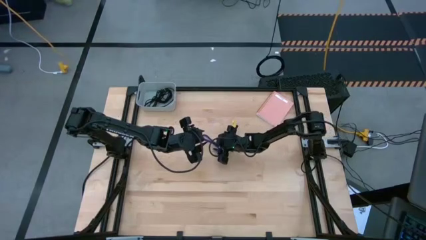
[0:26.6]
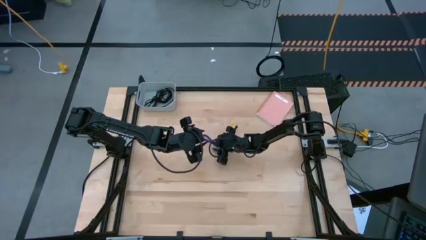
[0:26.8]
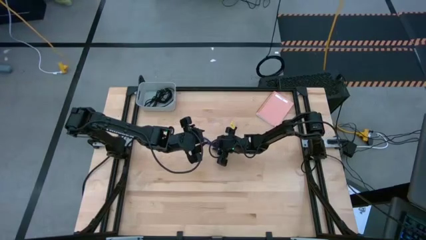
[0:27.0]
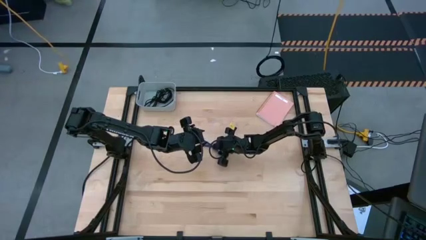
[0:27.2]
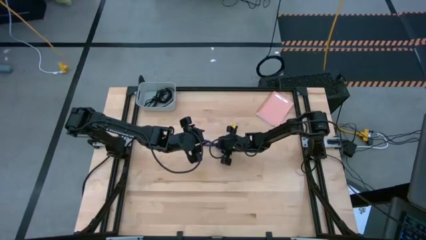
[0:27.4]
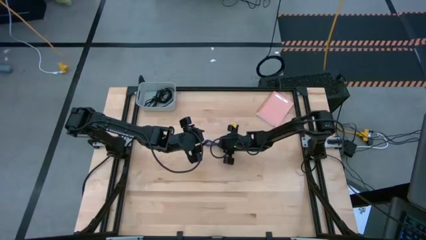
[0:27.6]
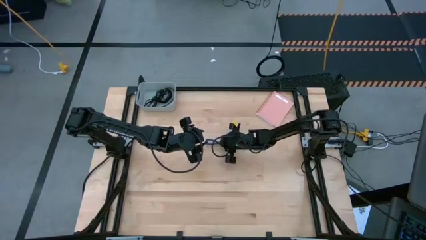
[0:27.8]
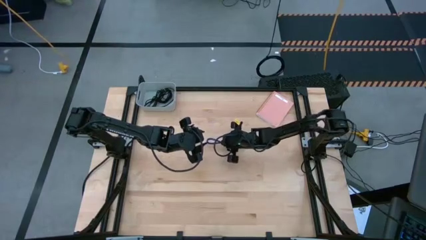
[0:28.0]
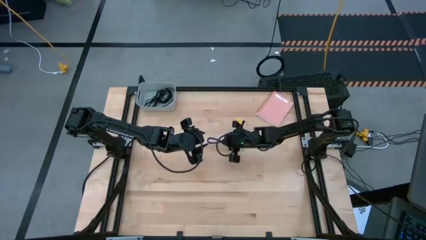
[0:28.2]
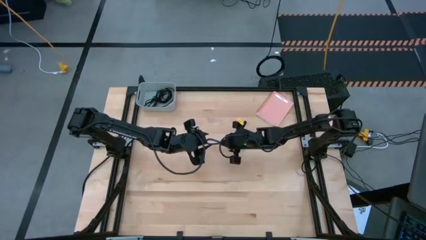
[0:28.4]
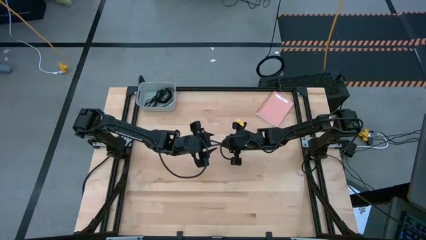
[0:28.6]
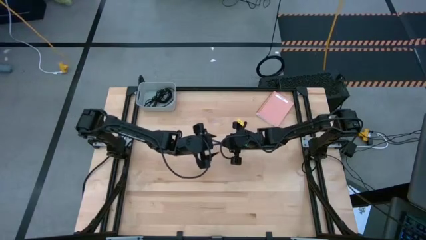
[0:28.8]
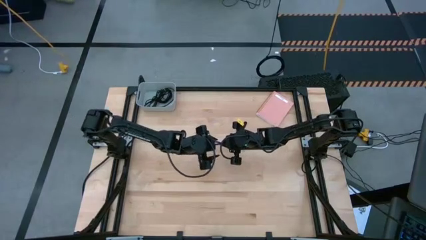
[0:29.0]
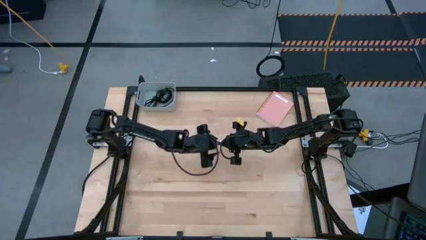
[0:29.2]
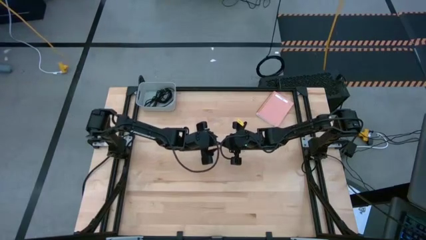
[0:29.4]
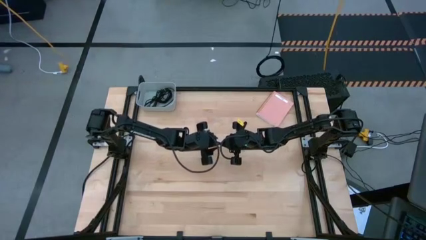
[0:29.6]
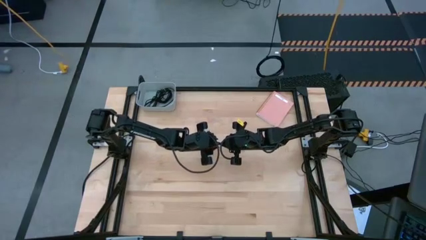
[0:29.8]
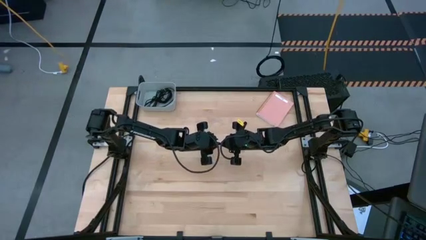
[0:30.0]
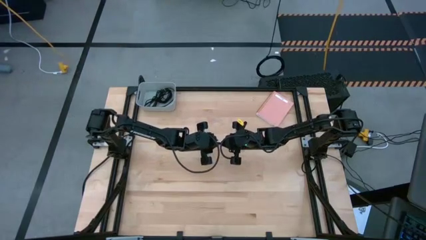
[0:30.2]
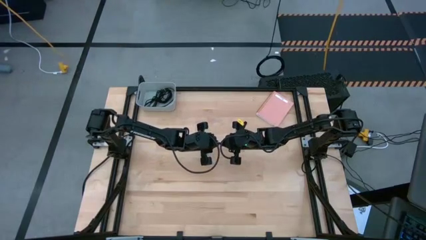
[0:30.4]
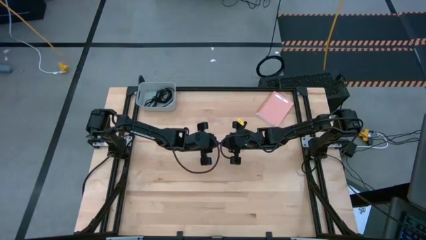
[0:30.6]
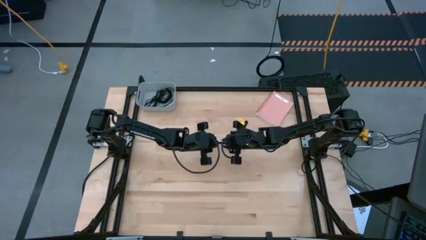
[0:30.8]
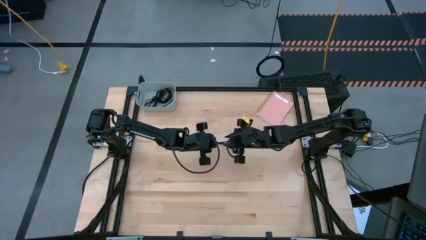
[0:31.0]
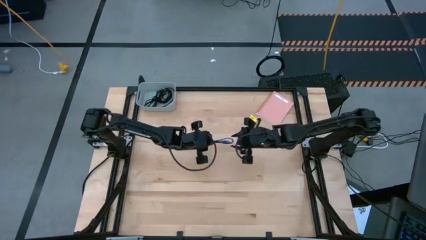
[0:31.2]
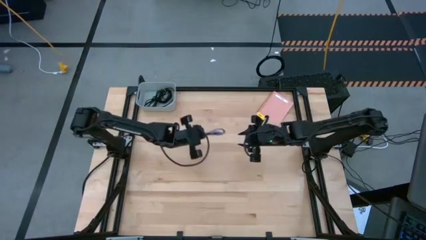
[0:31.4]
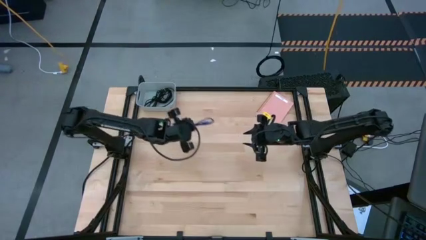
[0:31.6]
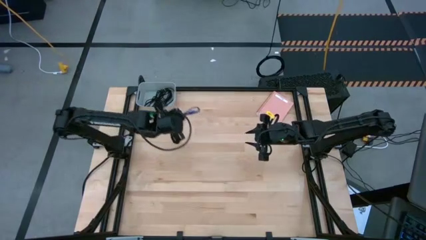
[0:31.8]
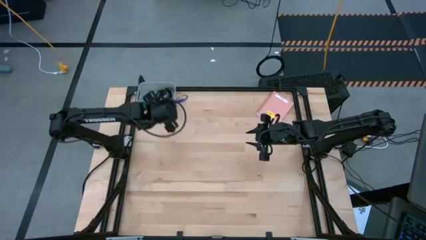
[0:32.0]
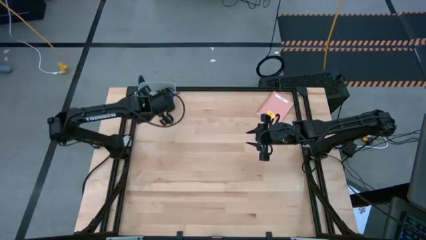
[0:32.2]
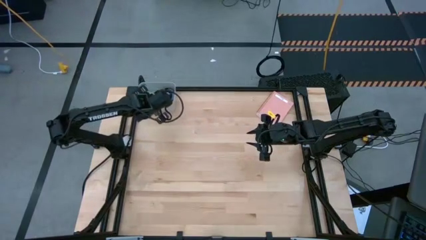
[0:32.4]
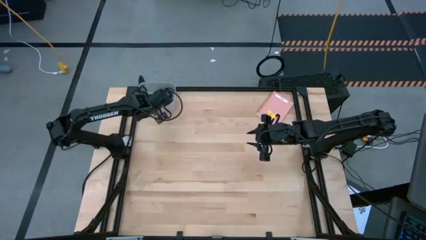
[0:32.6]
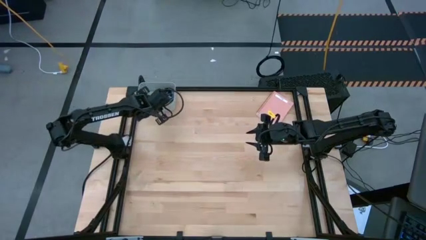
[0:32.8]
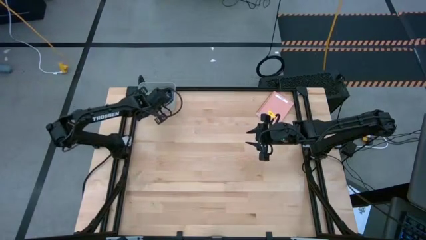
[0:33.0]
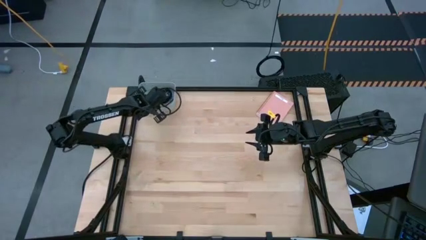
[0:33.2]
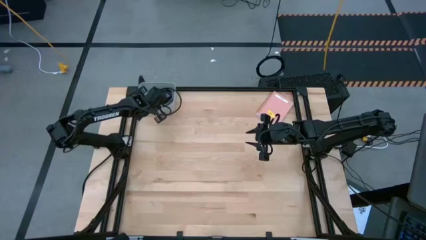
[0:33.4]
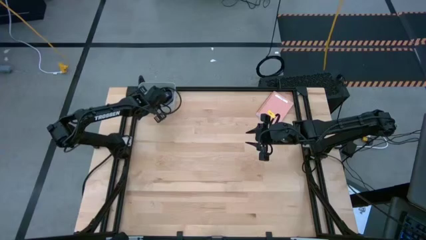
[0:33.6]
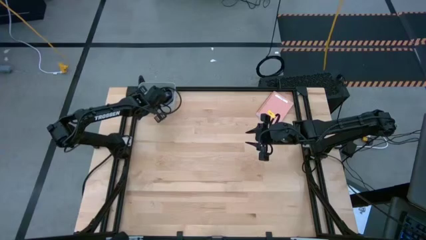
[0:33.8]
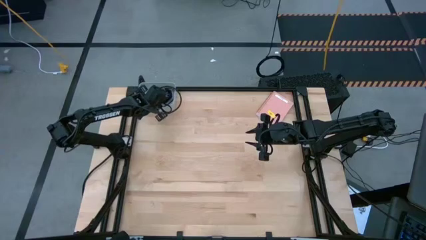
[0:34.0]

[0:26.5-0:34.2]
Task: Pick and place USB-C Cables
Put the blue charger cable into the white bin

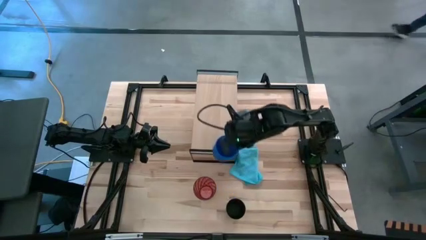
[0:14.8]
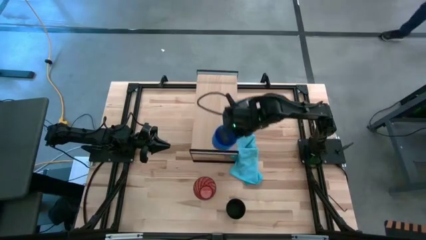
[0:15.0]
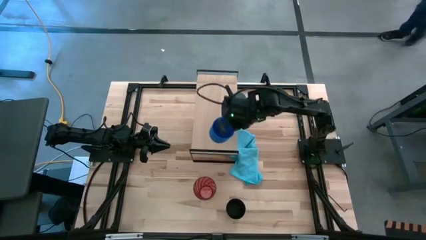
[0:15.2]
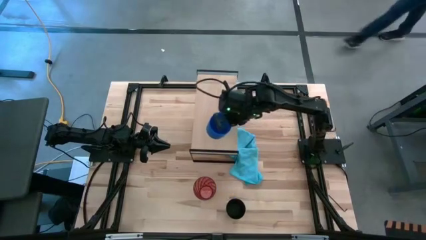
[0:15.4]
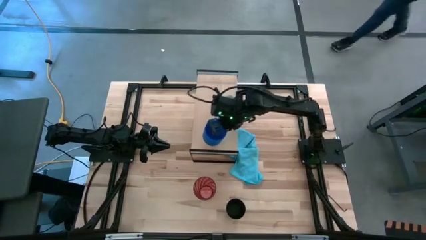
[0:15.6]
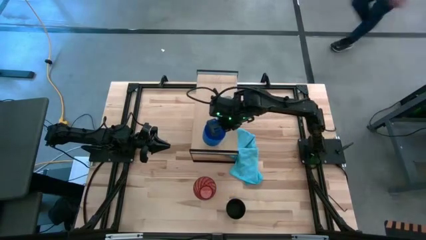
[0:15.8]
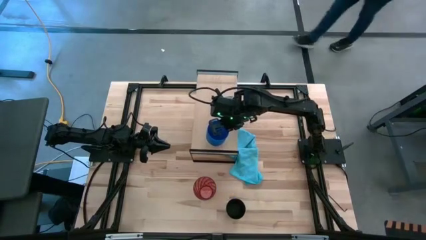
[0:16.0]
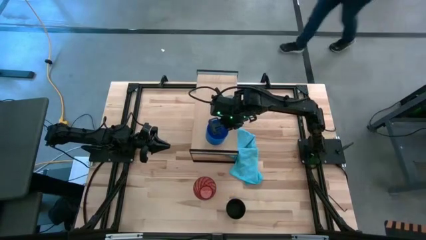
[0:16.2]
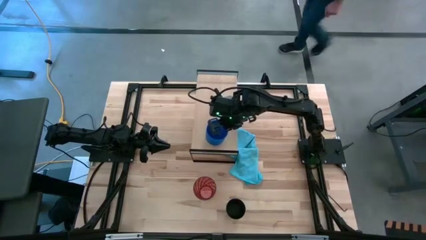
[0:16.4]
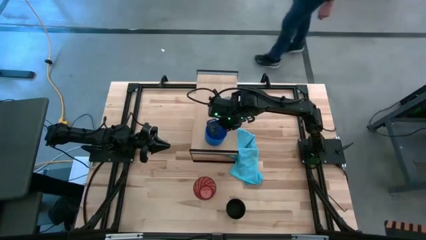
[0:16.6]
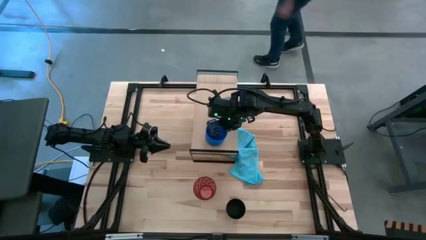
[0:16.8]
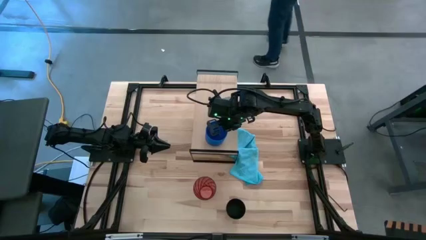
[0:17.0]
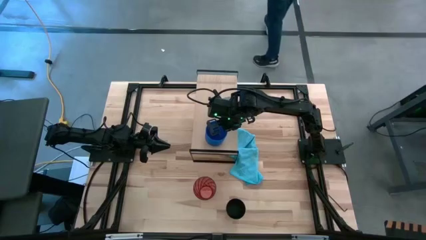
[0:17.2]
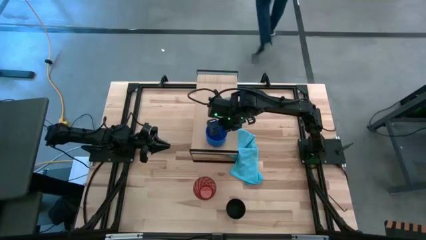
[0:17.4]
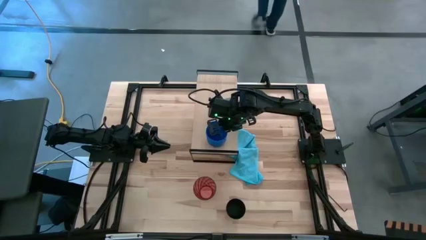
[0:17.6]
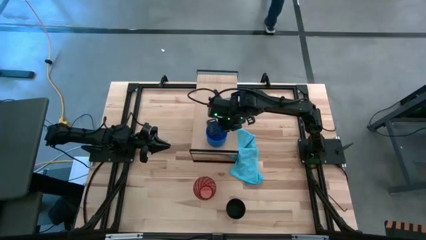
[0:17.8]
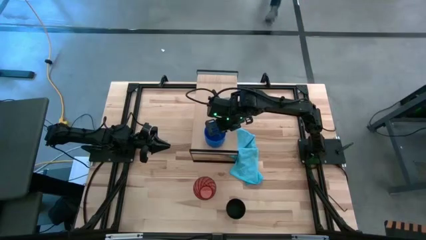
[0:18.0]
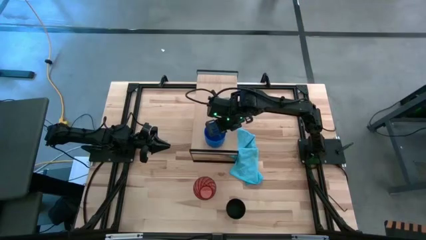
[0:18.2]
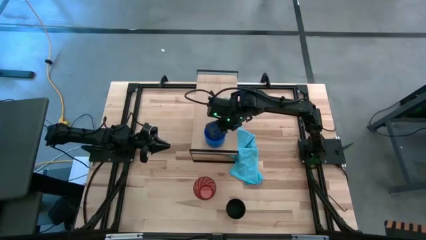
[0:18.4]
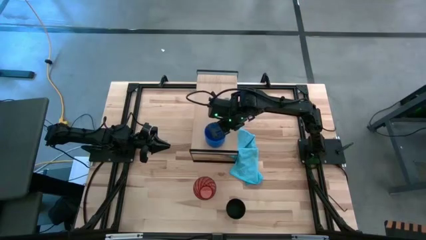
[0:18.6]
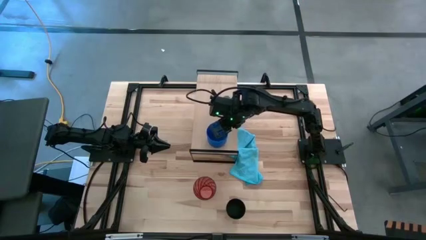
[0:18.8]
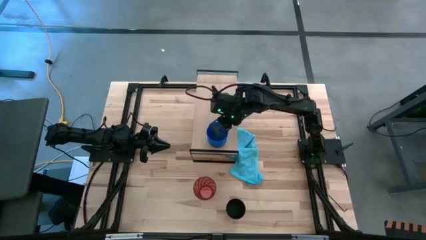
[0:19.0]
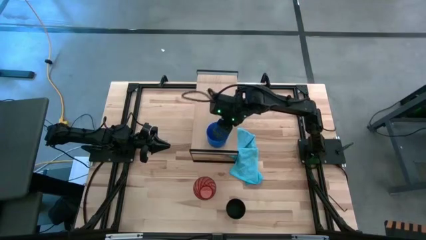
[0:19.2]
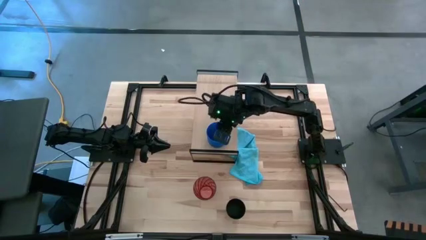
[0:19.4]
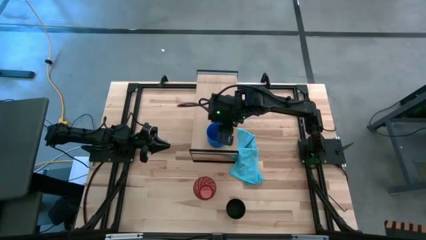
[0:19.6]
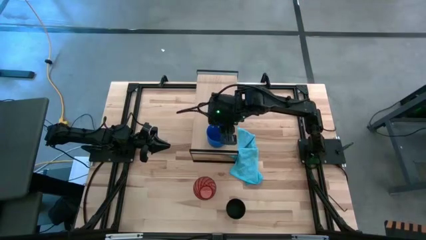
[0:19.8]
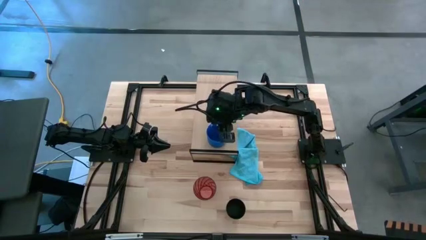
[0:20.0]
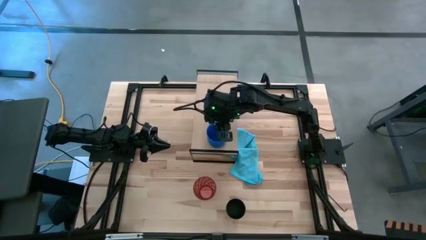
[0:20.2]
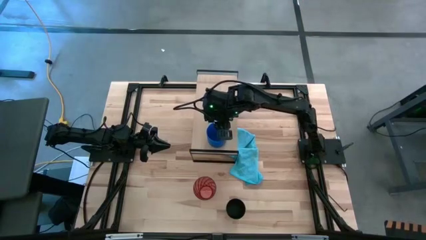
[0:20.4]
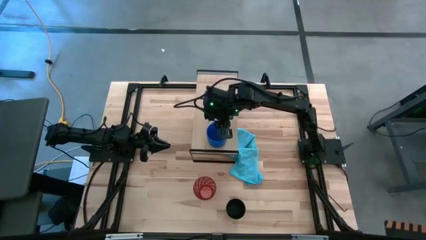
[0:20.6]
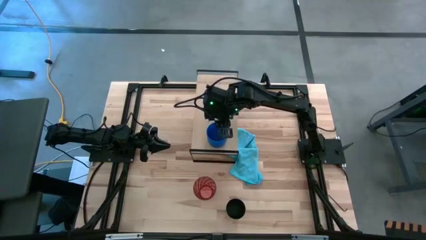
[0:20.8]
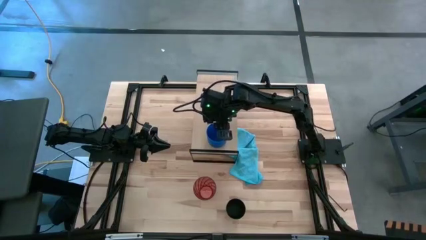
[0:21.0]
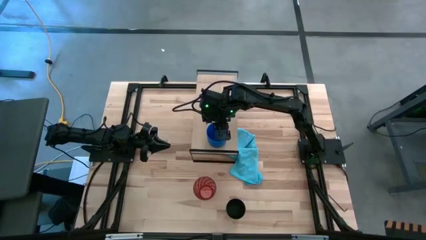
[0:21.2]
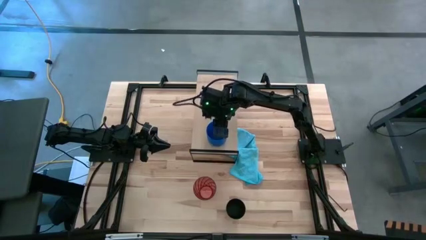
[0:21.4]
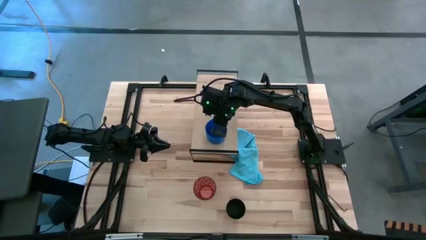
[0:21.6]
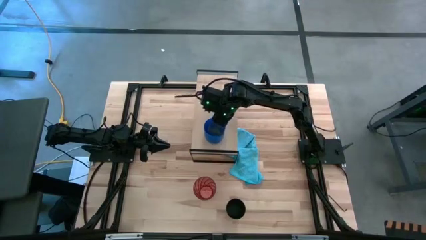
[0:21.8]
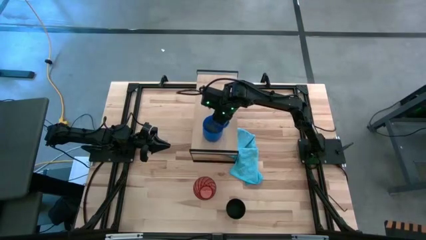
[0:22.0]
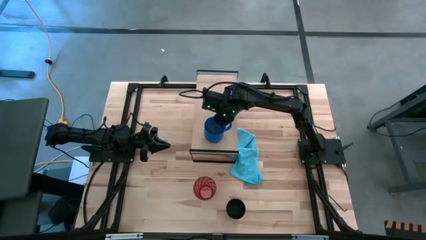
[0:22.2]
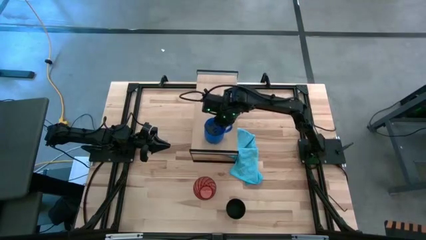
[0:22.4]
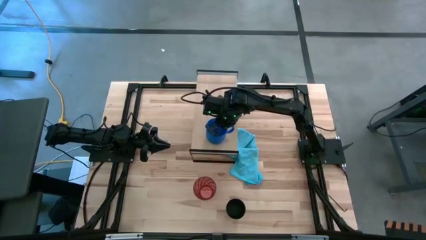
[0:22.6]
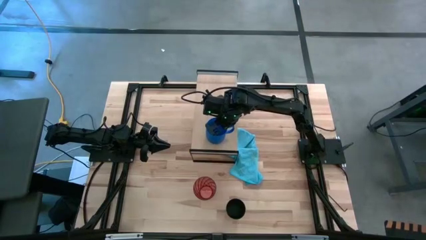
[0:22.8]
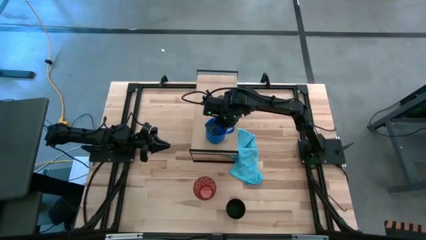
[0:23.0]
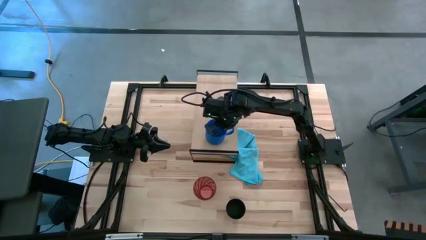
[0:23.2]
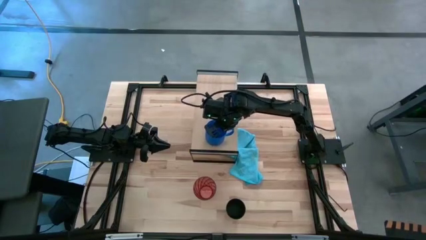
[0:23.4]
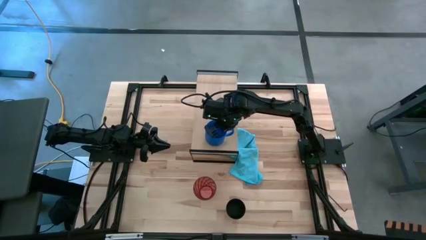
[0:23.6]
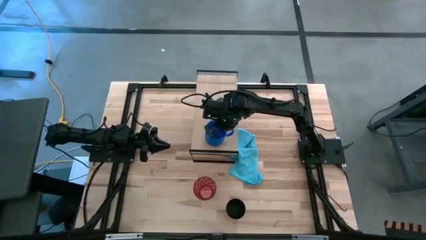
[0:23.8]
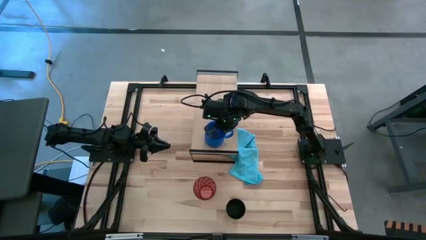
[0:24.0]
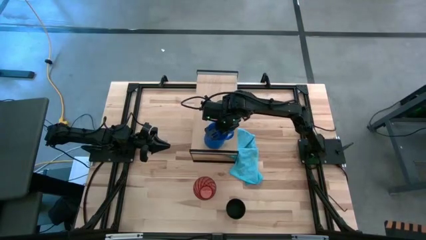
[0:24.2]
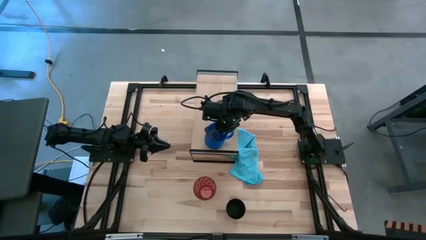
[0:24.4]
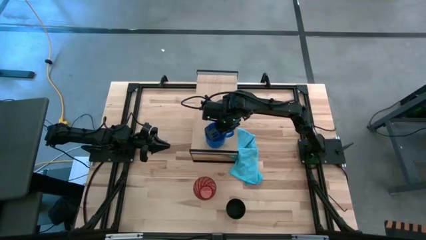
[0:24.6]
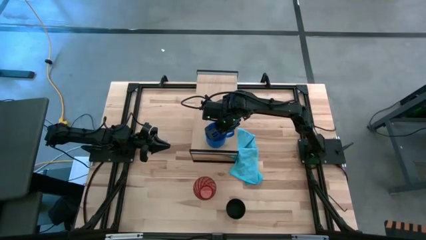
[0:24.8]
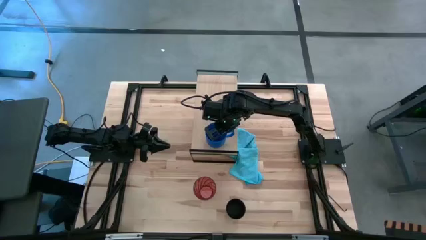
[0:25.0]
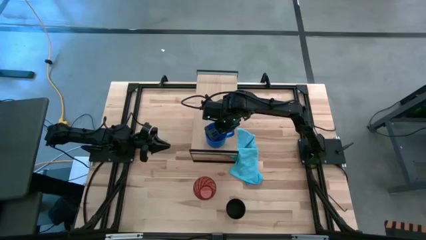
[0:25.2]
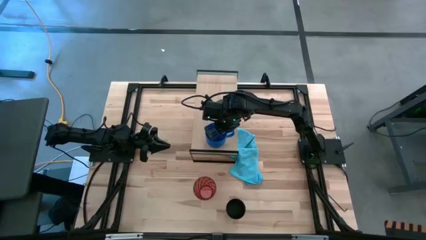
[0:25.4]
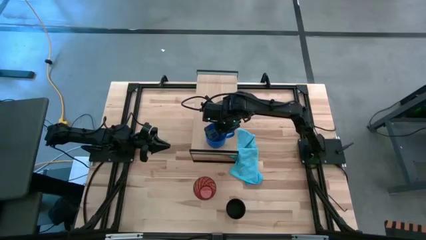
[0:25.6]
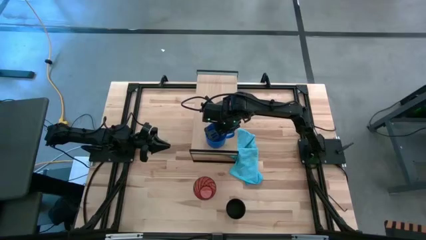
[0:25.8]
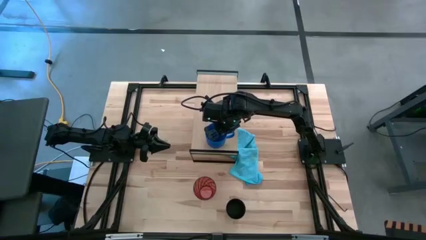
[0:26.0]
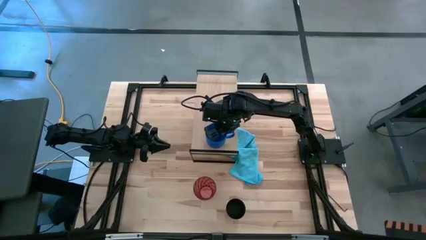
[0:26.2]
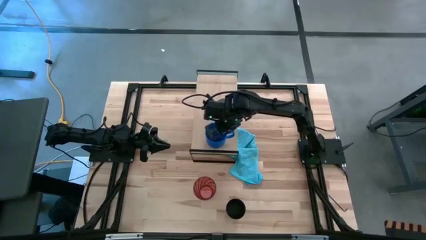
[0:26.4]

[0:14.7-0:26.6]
Task: Stack small to large cups/mugs on shelf
Put the blue mug on the shelf
